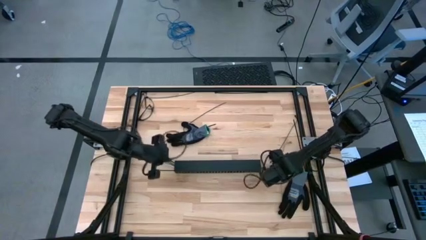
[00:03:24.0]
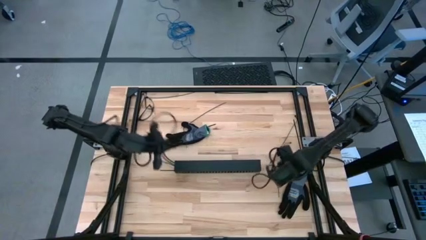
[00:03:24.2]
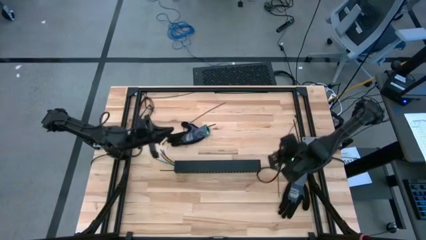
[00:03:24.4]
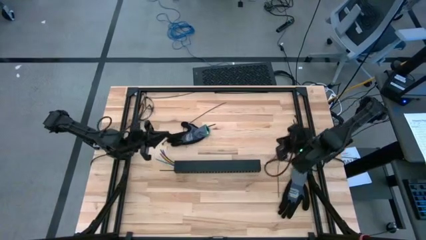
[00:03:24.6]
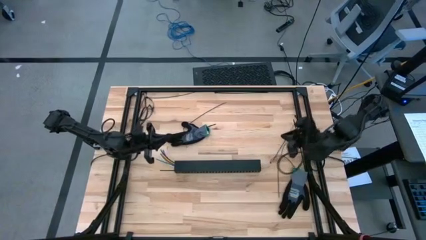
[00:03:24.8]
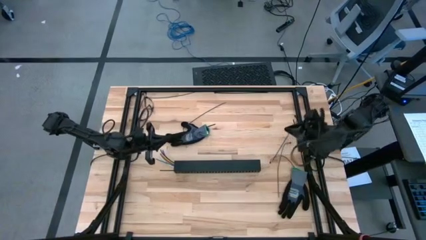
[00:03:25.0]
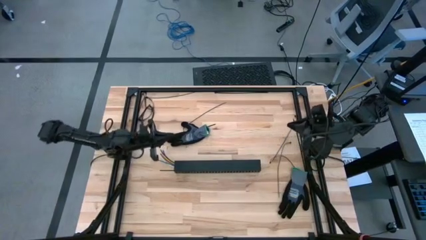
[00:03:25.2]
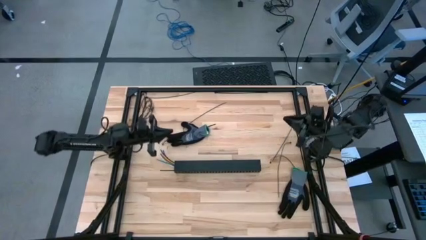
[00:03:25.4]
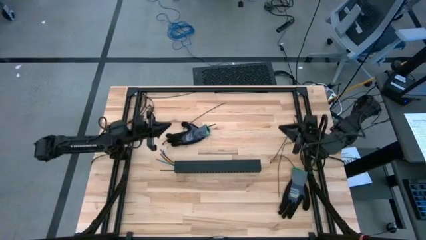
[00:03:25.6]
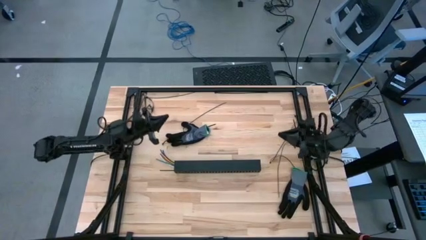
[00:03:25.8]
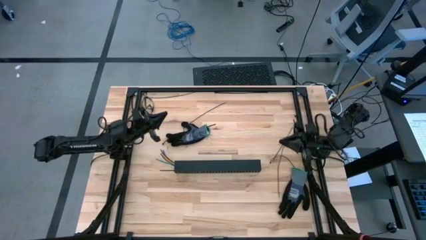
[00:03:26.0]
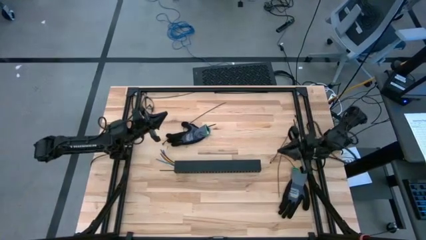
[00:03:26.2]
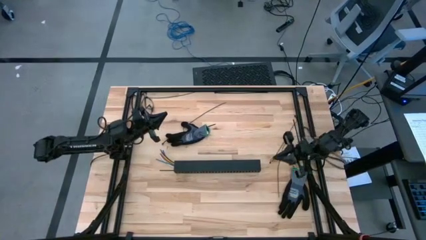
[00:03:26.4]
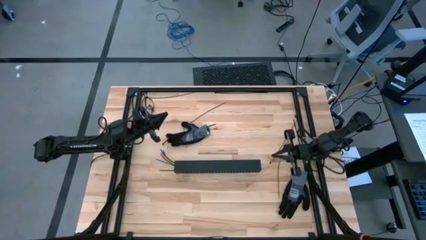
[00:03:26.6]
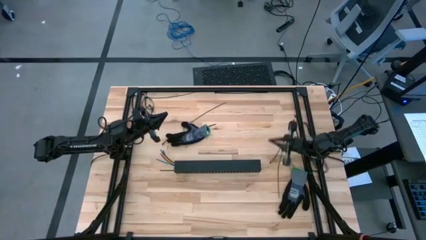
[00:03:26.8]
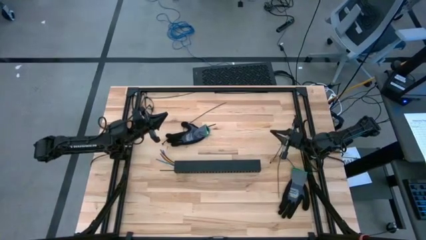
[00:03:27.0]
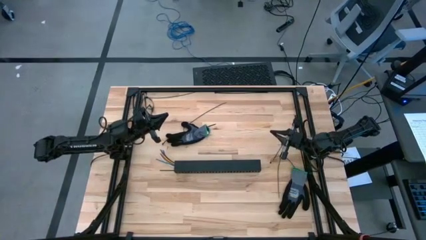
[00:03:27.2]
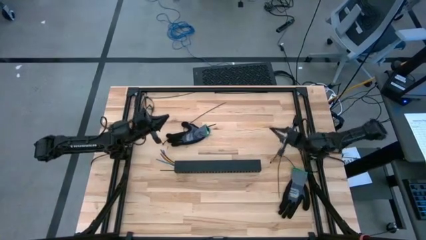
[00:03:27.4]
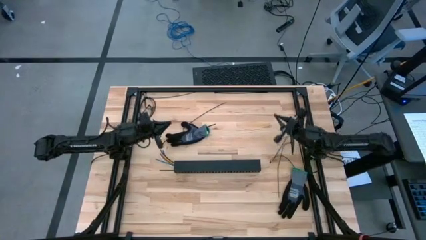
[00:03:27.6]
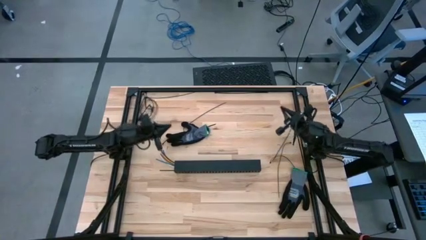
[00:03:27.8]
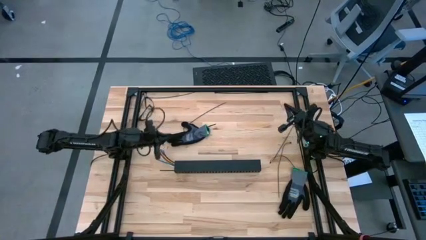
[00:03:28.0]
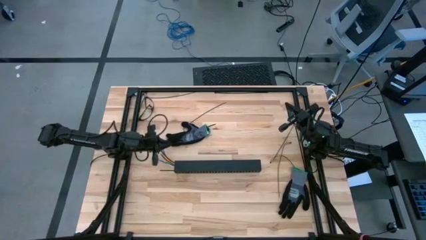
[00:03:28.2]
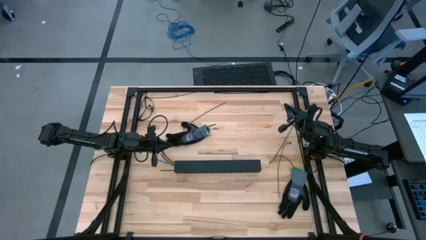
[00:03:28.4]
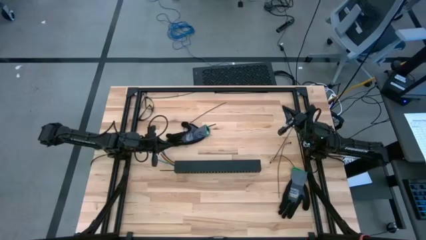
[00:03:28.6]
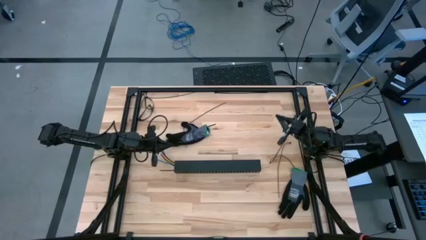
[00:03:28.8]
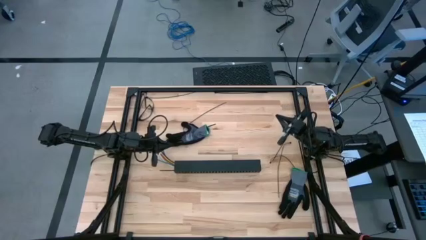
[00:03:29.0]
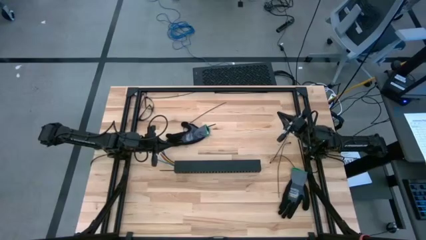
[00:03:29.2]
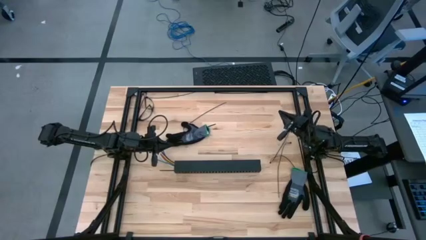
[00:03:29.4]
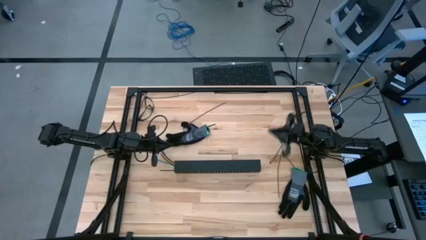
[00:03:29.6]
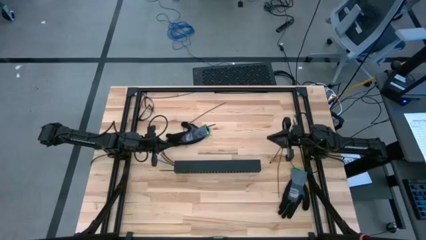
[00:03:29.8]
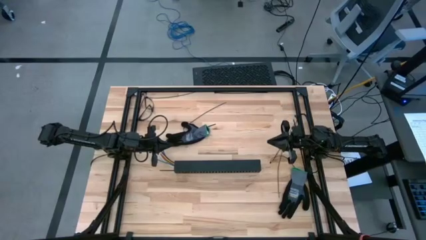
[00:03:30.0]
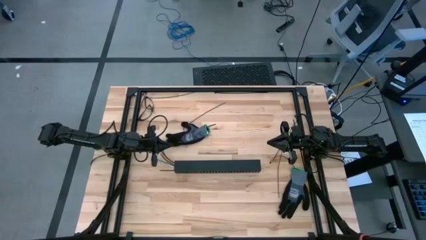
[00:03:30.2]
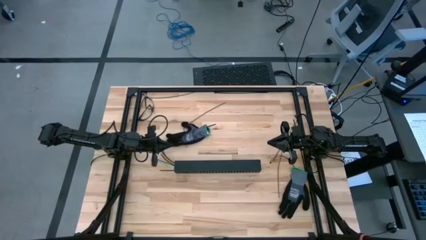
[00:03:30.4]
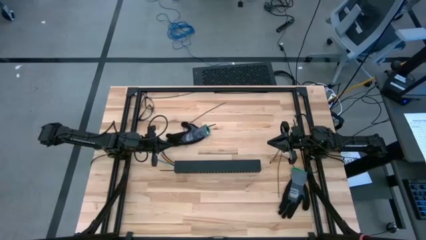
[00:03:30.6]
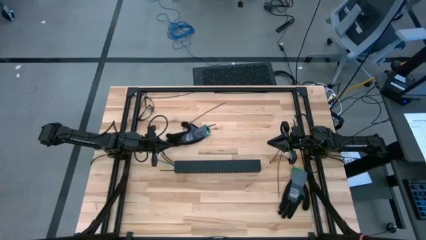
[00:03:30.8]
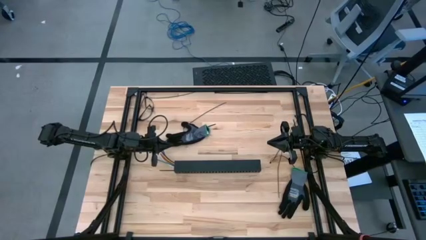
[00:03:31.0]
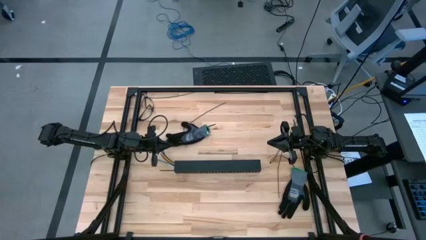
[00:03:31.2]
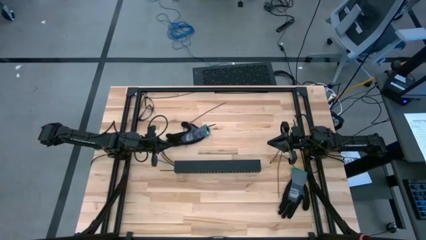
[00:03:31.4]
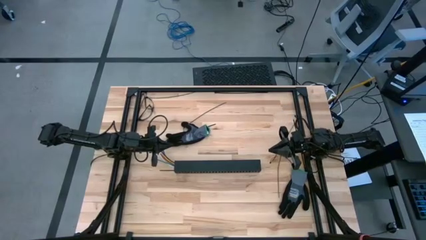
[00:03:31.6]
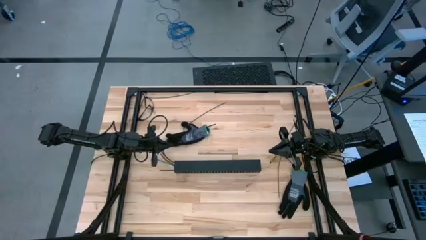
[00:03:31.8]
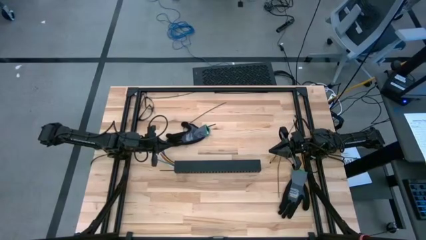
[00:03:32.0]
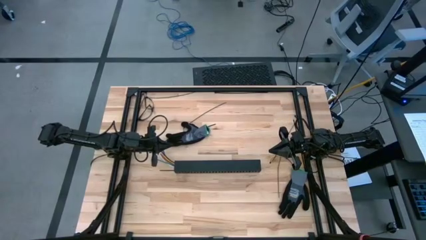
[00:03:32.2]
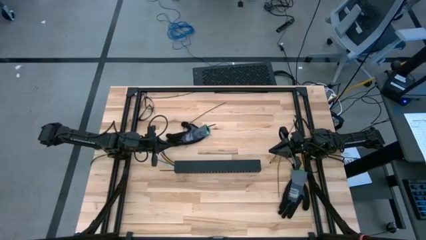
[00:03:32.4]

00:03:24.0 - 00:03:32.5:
Task: Ziptie cables
Return to Home Position
